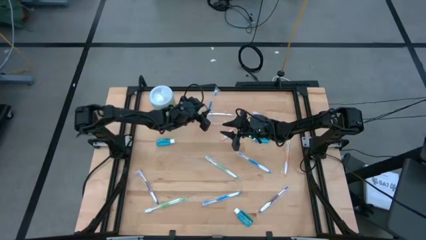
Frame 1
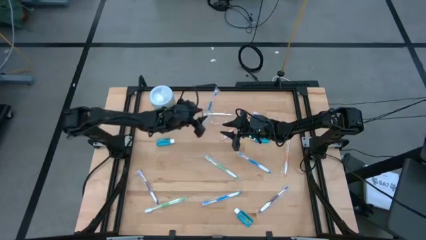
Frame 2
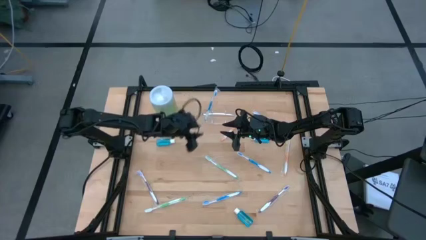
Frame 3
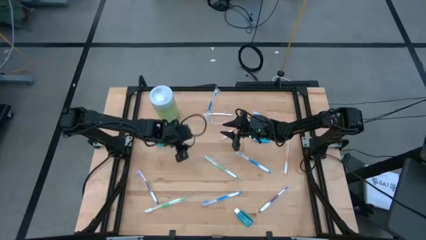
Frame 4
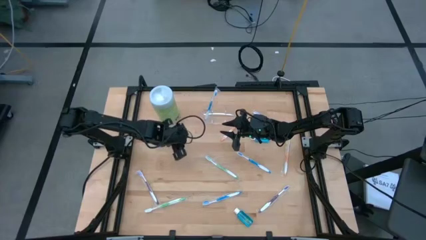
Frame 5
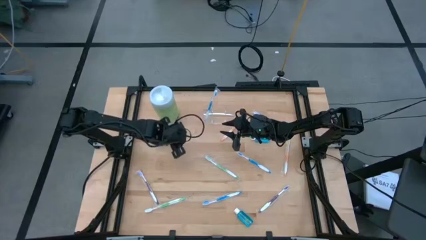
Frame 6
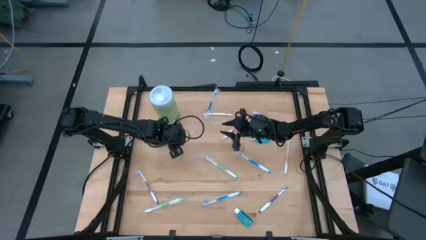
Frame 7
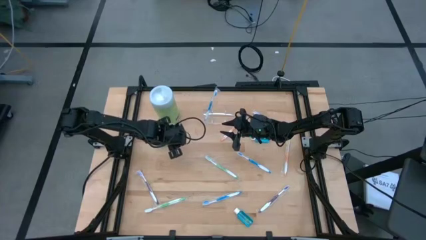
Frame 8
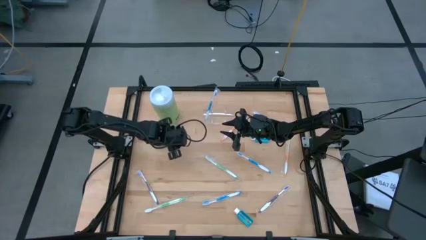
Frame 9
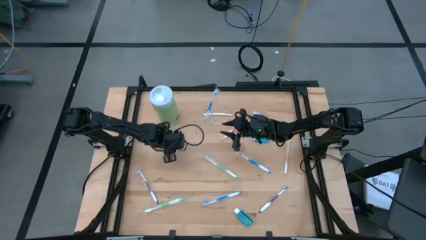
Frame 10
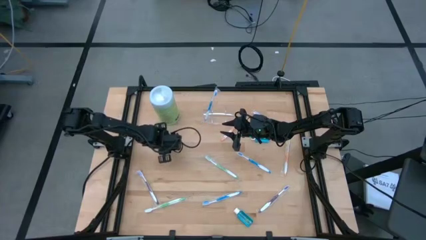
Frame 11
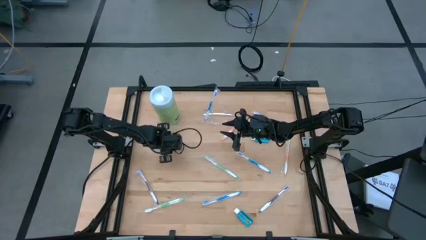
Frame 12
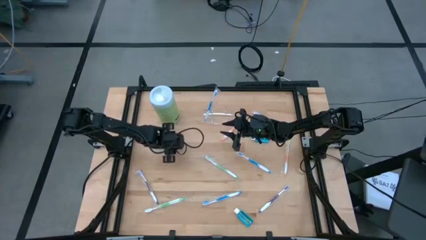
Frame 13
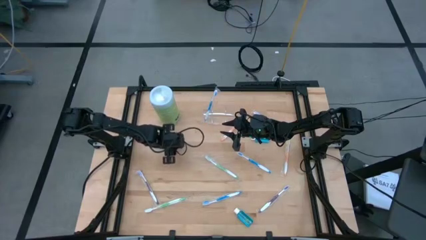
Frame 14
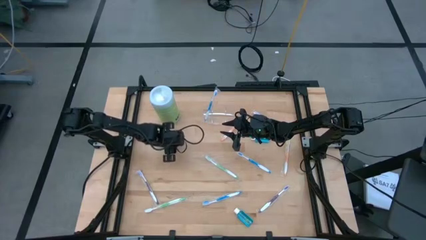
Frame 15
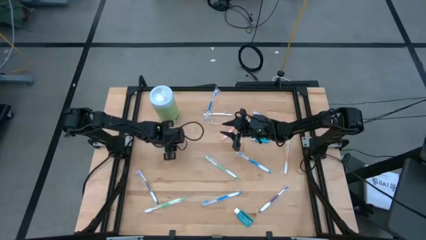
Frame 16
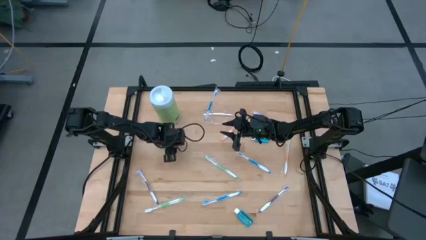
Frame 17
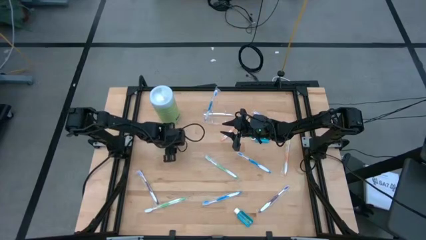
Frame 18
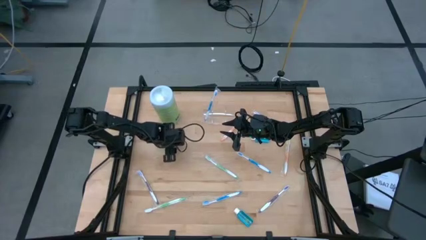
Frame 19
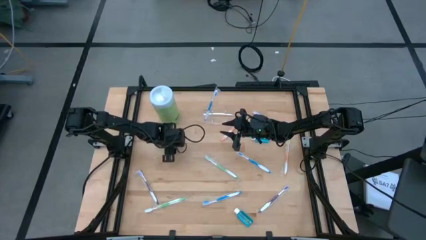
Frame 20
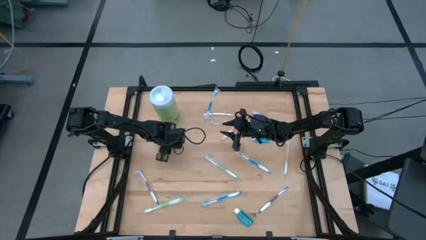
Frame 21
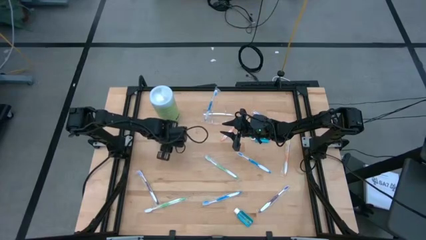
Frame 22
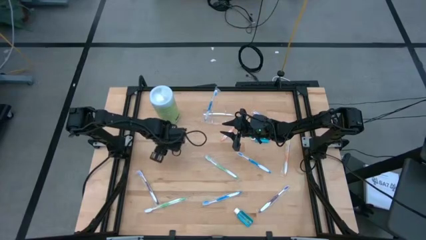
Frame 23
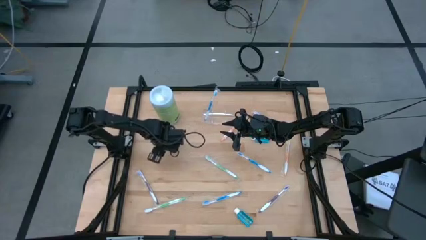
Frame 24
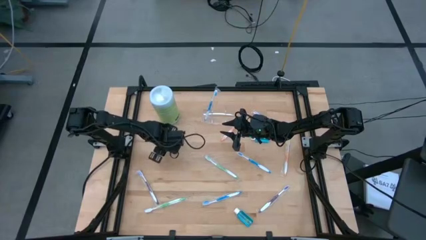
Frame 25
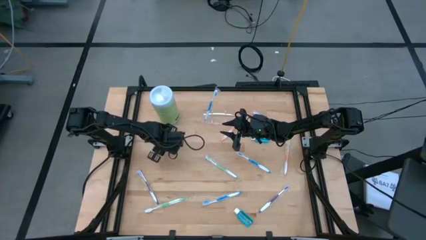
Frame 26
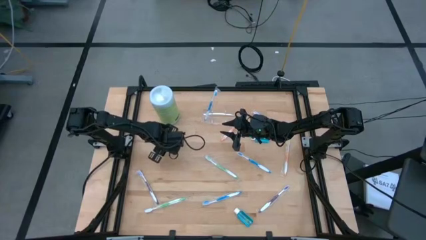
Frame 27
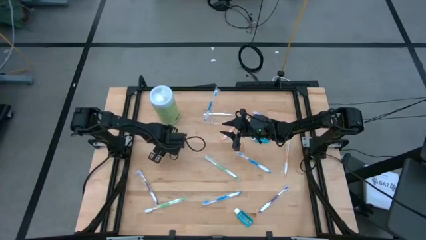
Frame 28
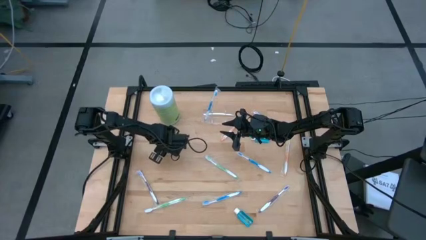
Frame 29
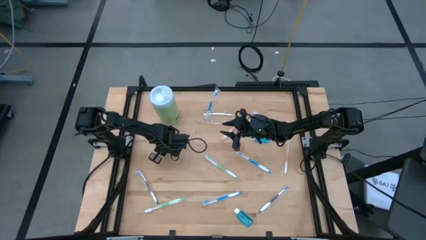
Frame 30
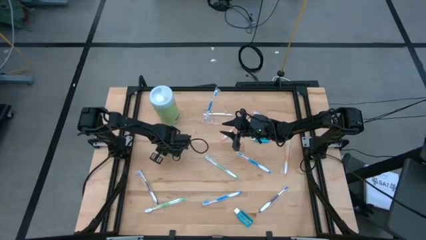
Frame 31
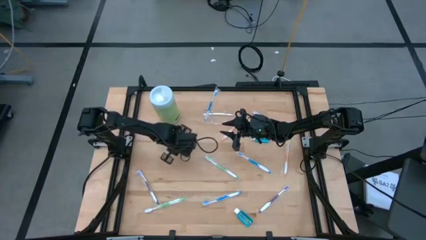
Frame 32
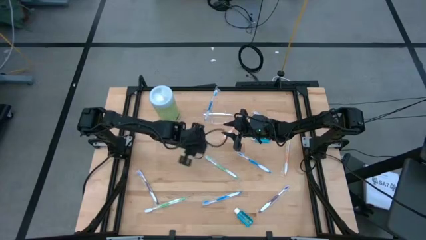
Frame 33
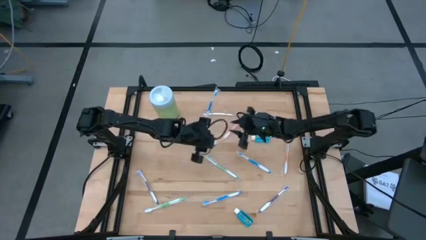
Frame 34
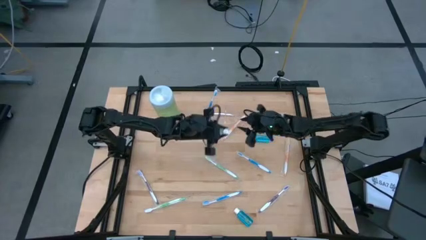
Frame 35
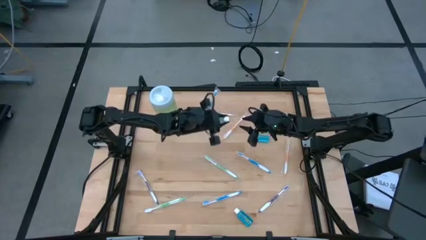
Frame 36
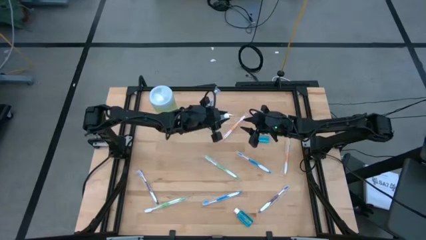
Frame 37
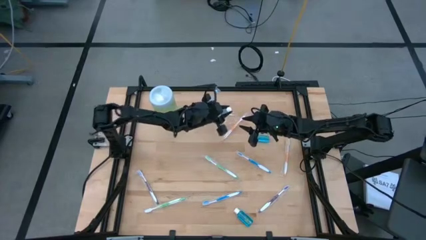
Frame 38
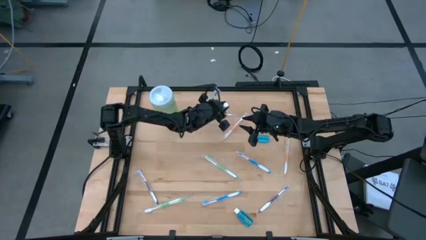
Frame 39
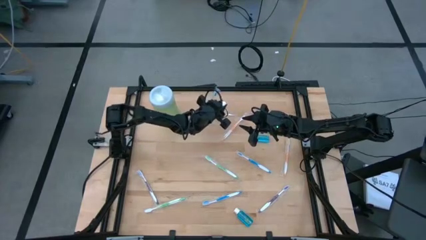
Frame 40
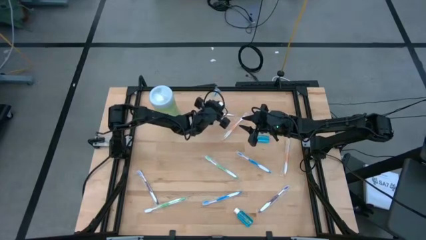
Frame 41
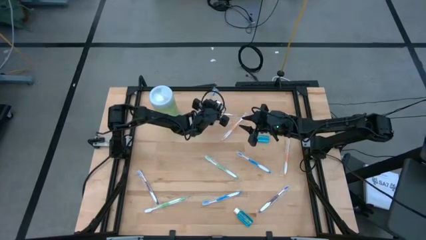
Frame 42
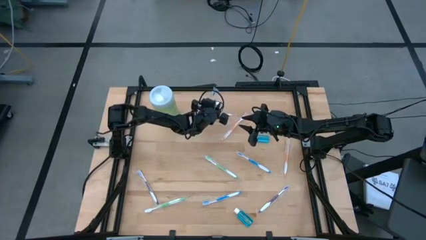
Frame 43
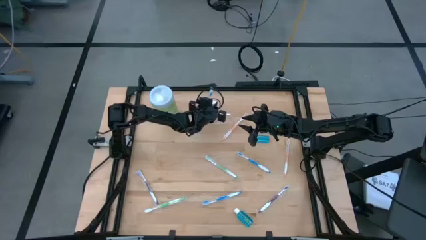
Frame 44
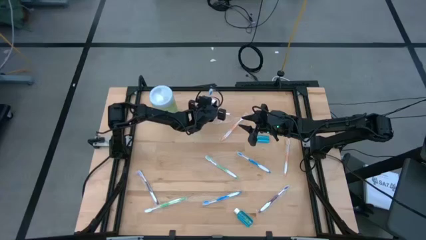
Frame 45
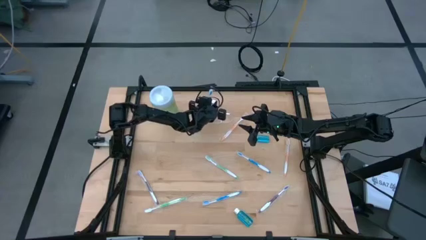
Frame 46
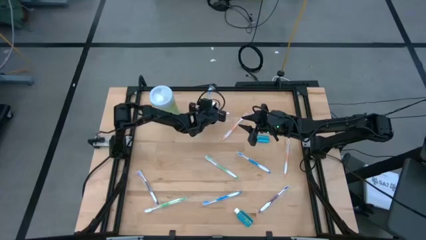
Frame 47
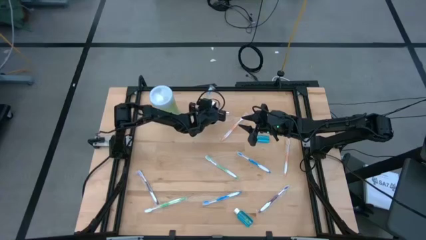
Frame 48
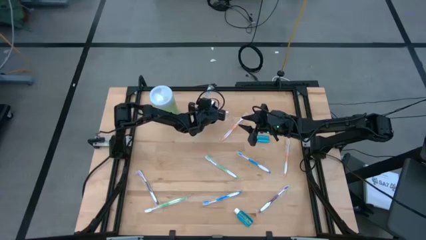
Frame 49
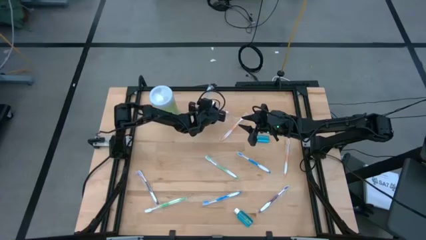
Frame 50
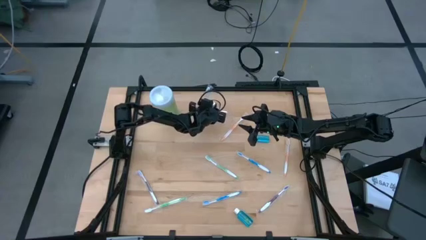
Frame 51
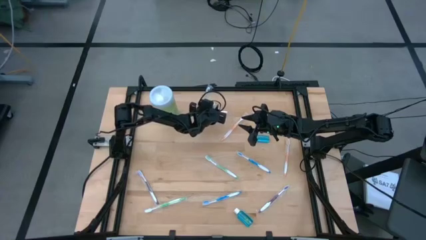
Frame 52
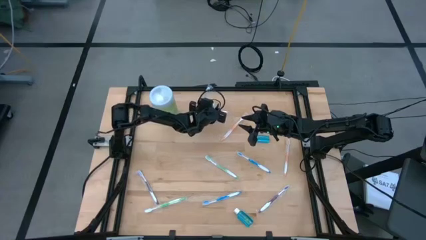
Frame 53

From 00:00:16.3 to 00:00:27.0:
Task: Pick & Place toothbrushing station
Put the left mouthwash into the transparent organizer

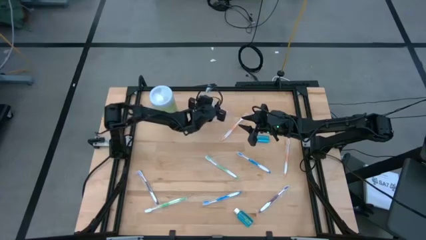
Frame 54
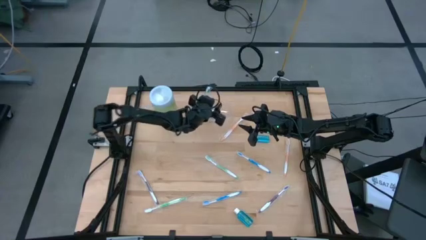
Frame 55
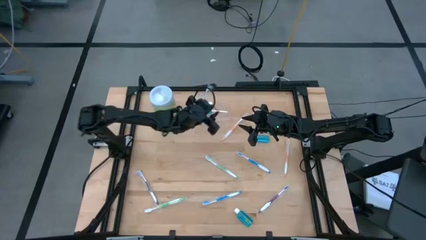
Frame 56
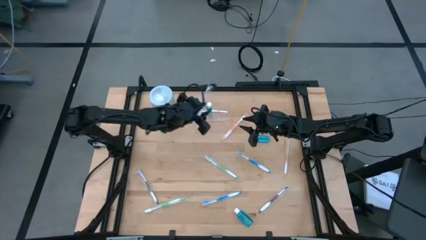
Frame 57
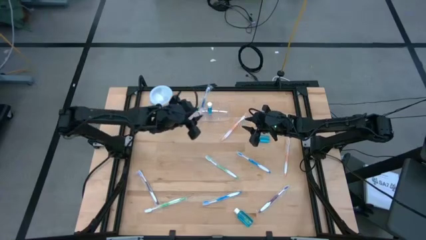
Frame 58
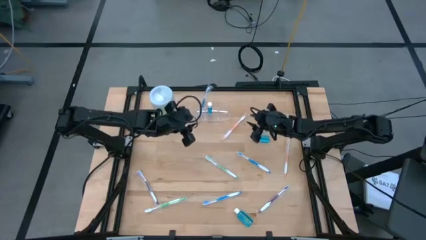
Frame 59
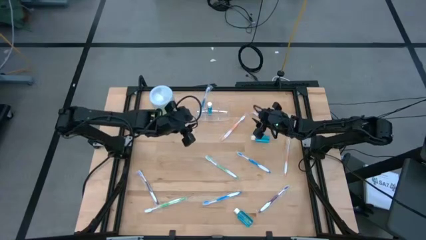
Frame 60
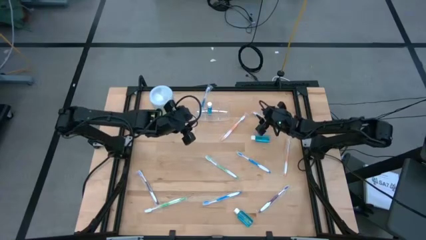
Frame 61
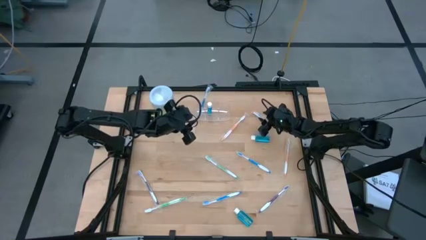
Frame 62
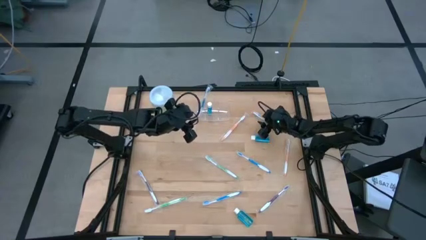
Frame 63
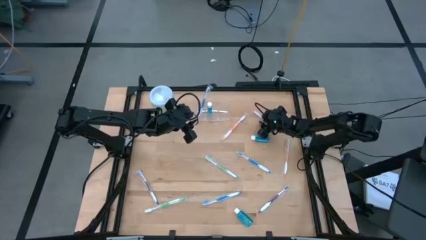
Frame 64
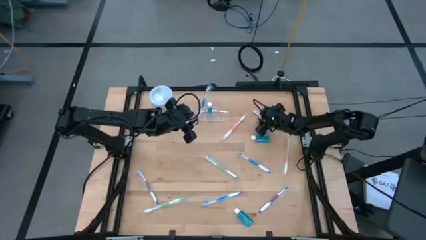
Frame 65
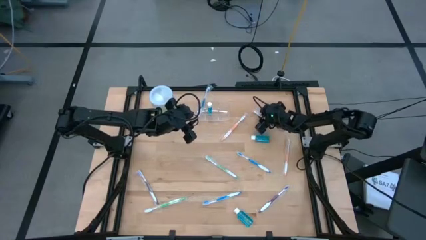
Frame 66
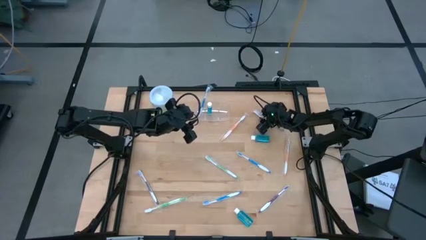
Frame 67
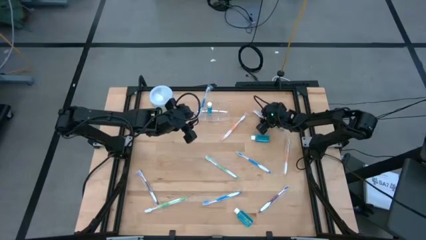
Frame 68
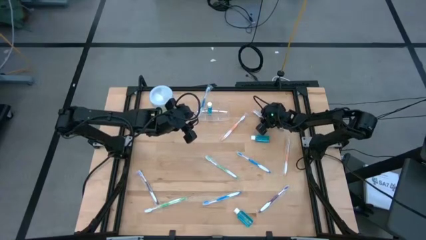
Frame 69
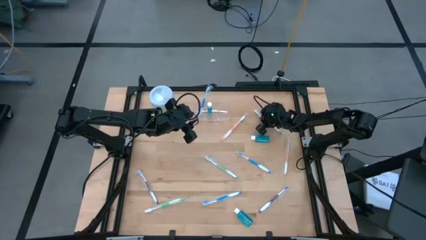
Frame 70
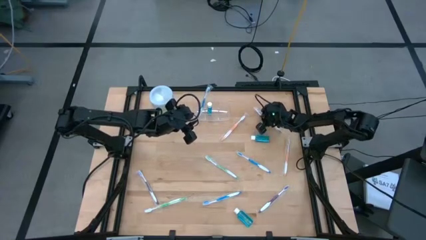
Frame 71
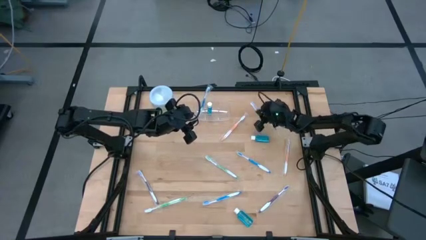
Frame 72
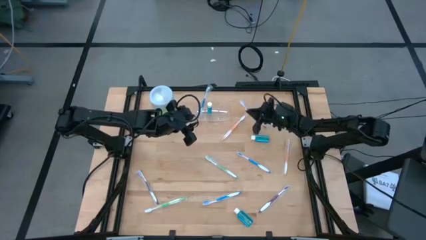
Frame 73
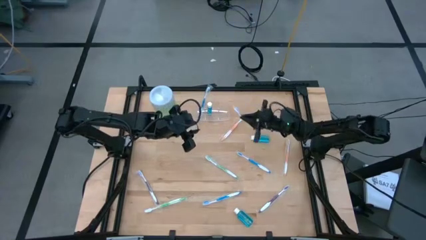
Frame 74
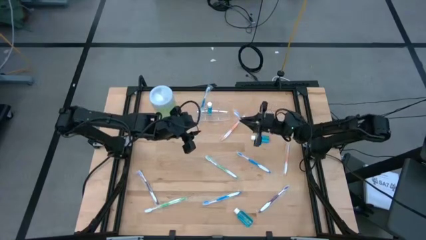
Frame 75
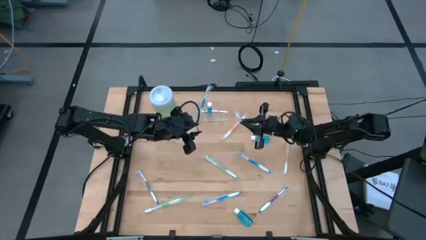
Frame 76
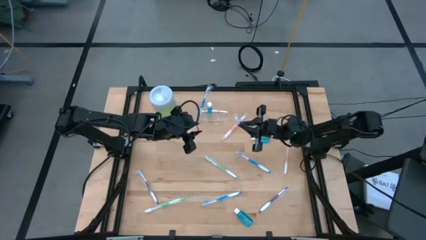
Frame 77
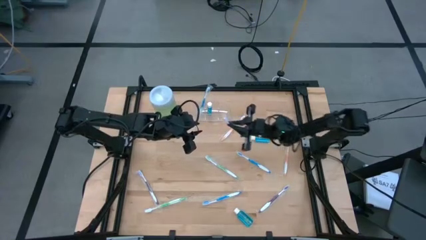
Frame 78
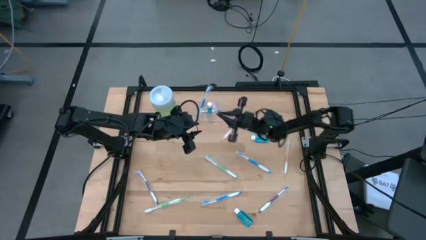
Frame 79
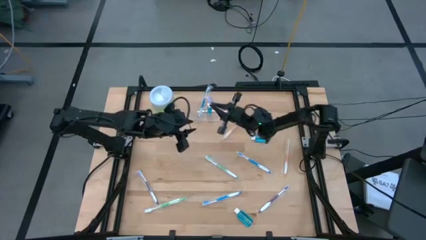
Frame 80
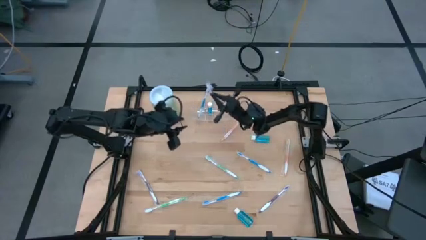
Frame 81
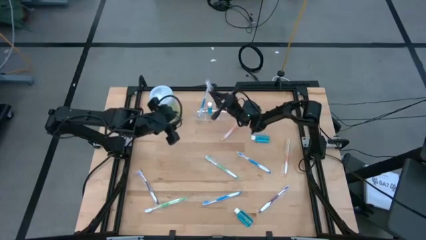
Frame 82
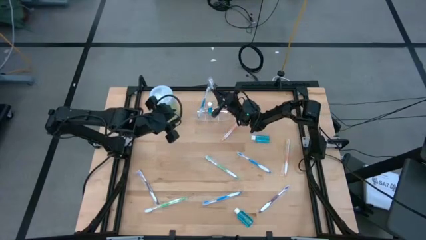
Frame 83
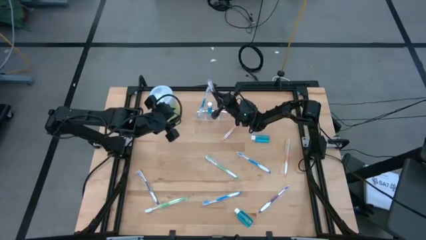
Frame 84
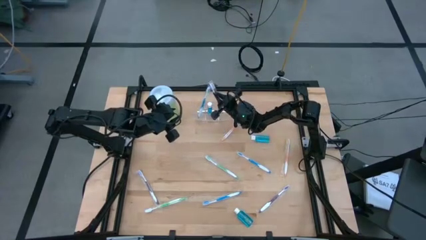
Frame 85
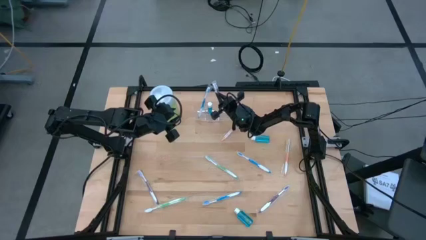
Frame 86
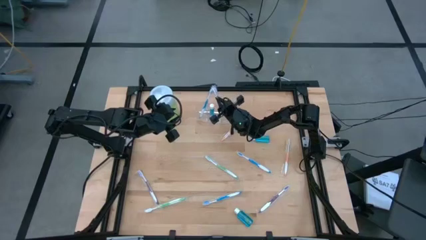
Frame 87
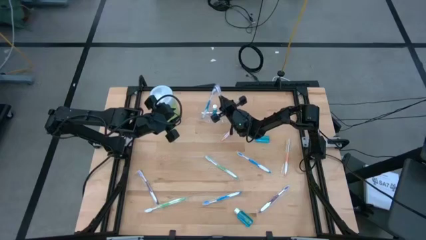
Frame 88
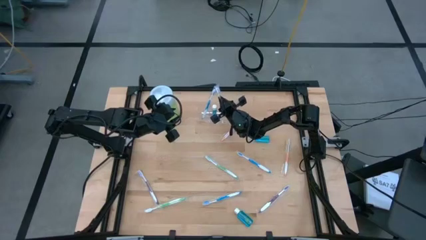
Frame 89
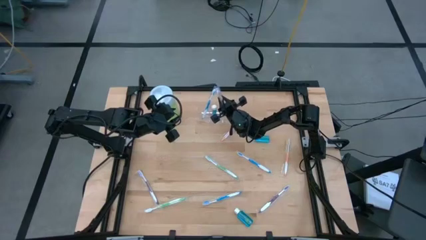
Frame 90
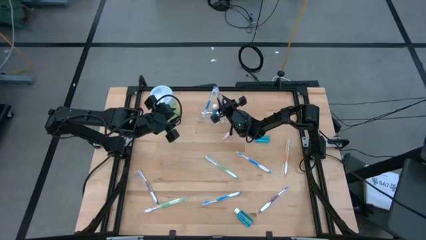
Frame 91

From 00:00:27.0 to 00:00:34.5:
Put the top violet toothbrush into the transparent organizer
